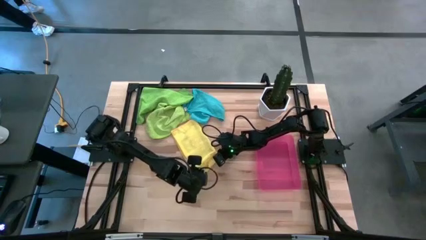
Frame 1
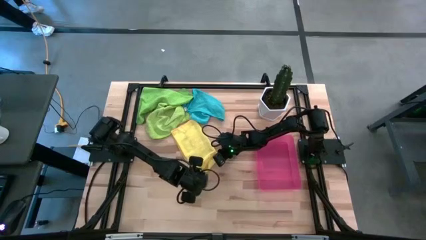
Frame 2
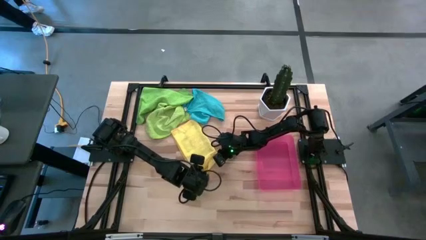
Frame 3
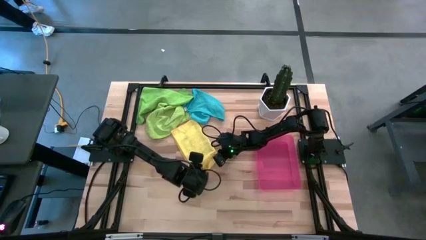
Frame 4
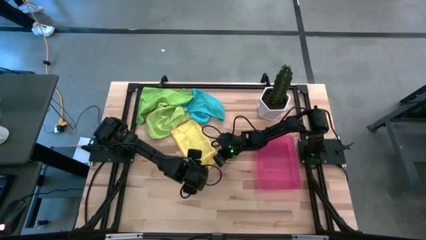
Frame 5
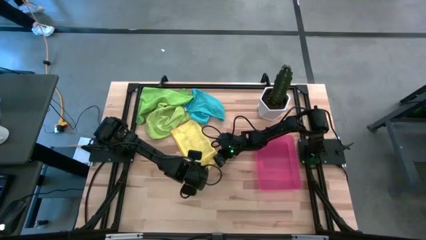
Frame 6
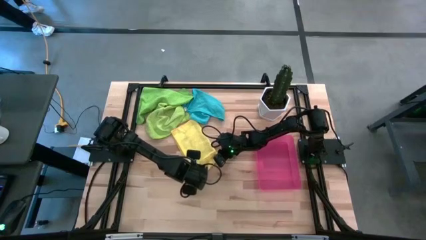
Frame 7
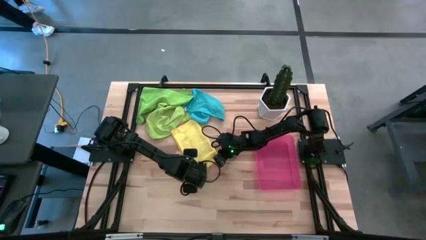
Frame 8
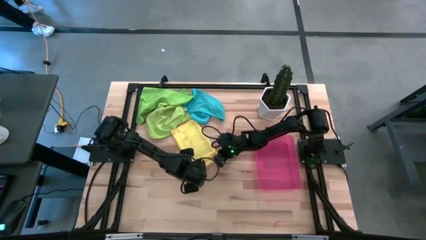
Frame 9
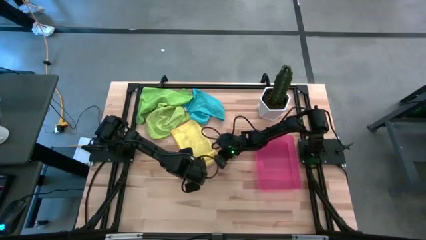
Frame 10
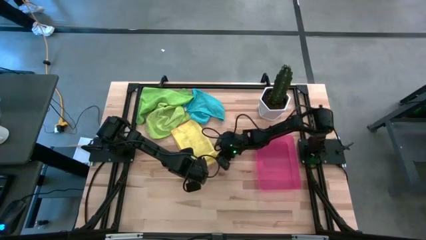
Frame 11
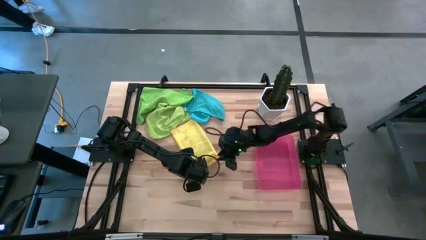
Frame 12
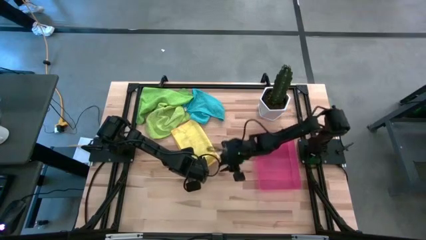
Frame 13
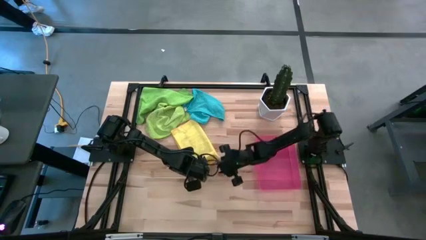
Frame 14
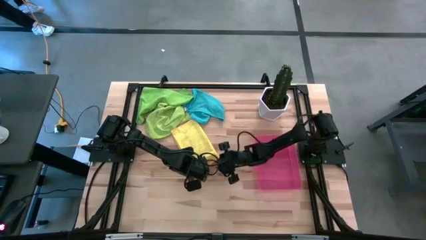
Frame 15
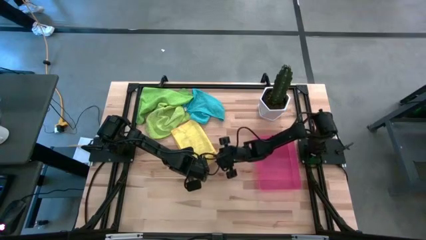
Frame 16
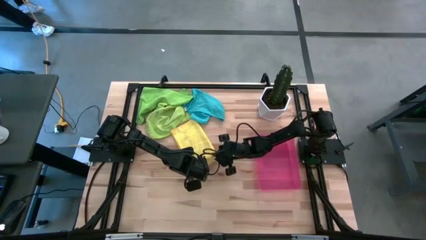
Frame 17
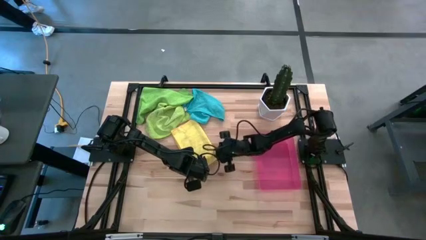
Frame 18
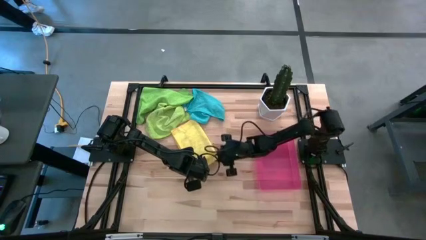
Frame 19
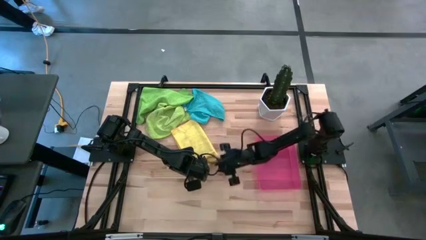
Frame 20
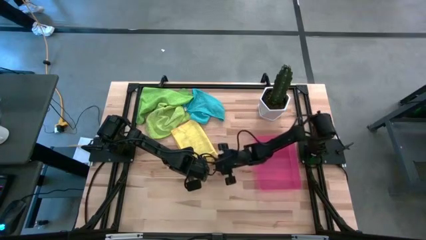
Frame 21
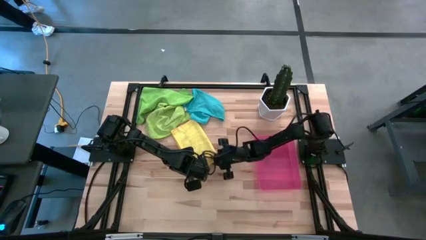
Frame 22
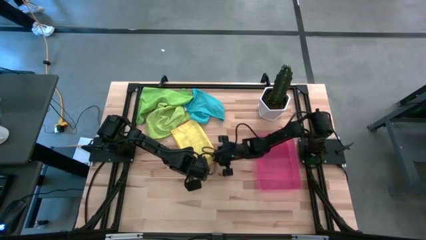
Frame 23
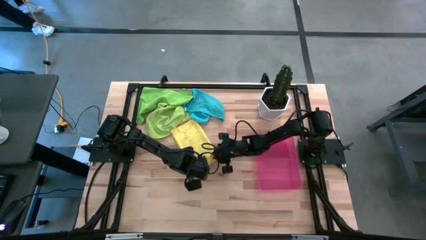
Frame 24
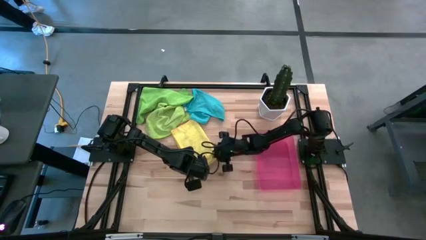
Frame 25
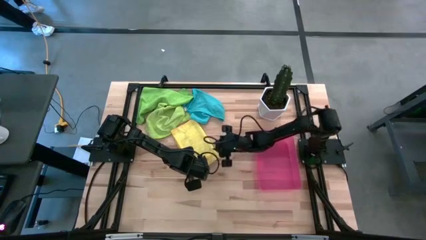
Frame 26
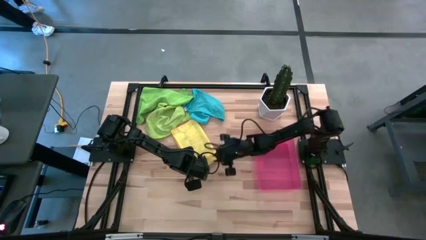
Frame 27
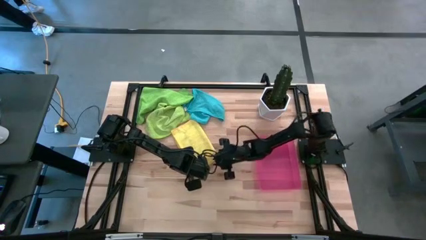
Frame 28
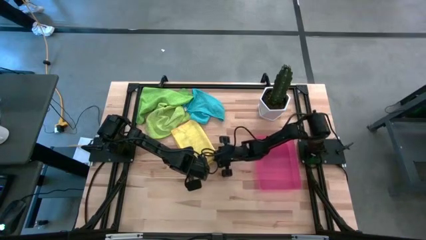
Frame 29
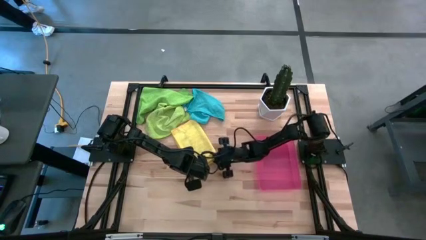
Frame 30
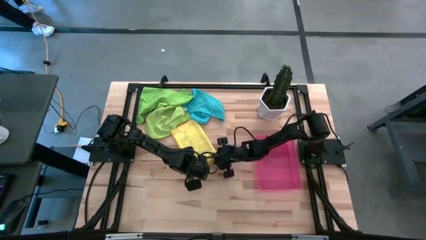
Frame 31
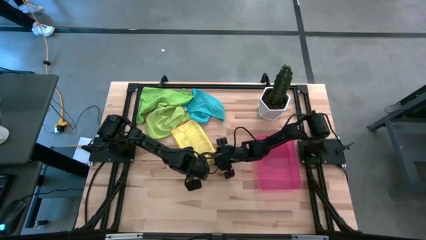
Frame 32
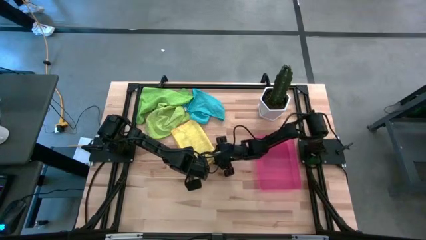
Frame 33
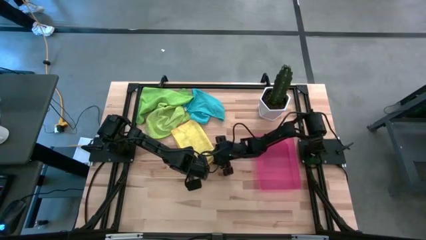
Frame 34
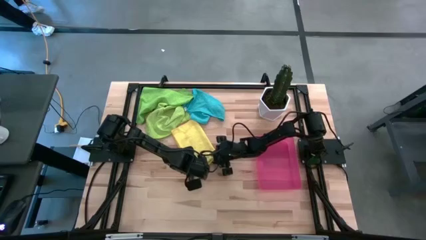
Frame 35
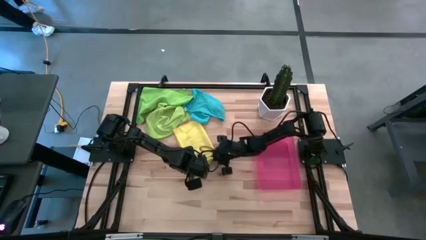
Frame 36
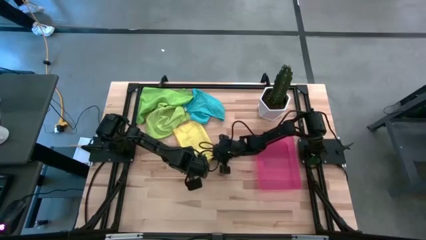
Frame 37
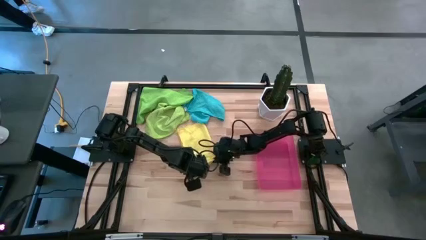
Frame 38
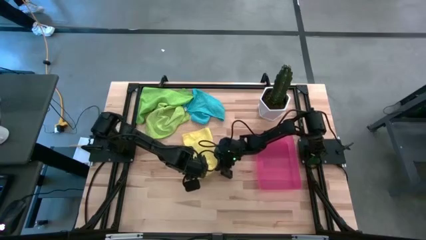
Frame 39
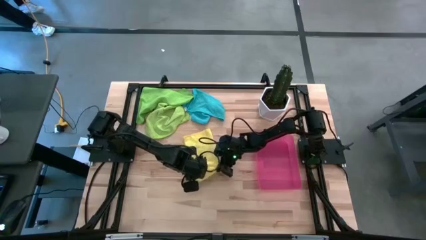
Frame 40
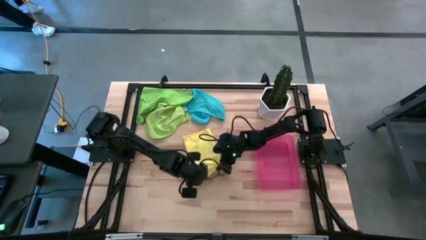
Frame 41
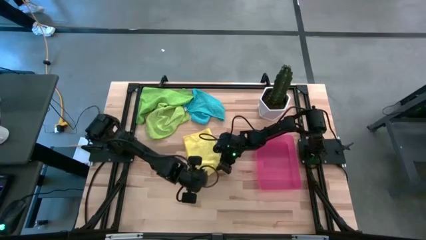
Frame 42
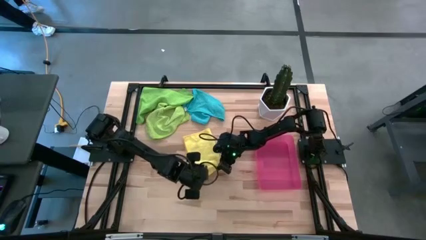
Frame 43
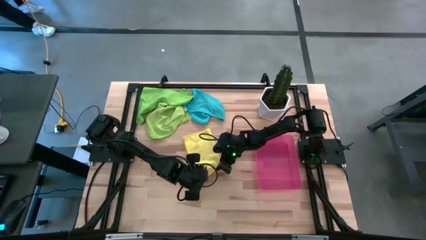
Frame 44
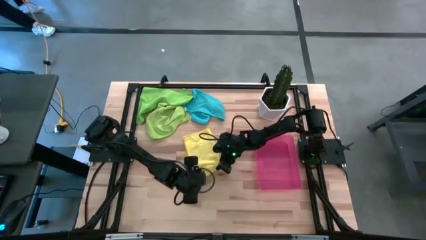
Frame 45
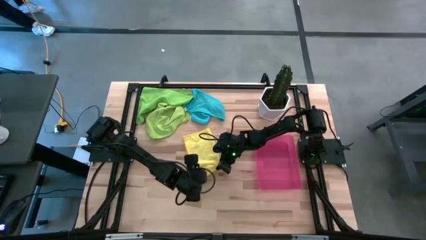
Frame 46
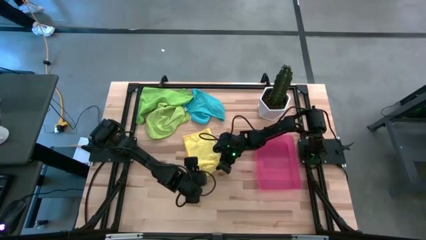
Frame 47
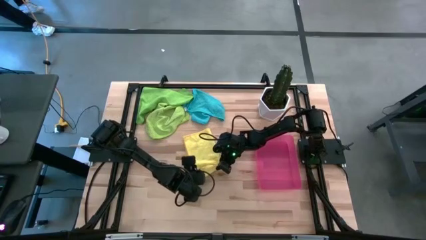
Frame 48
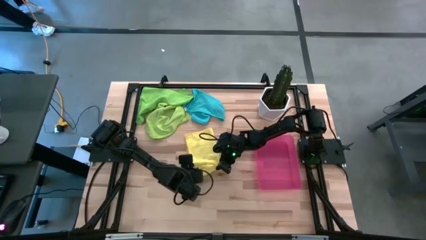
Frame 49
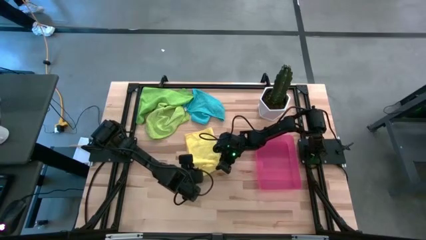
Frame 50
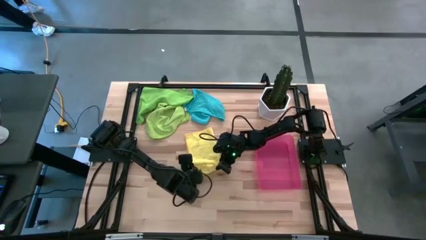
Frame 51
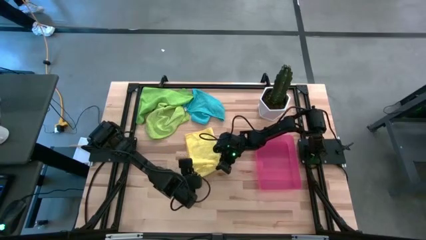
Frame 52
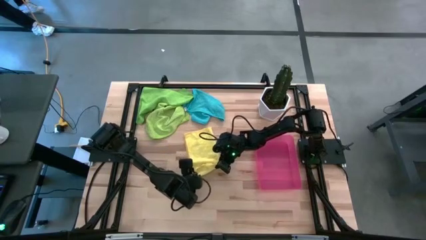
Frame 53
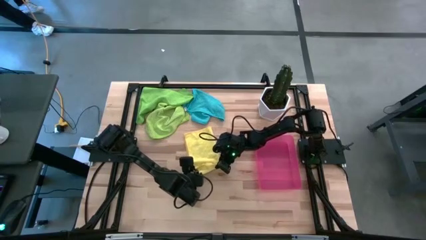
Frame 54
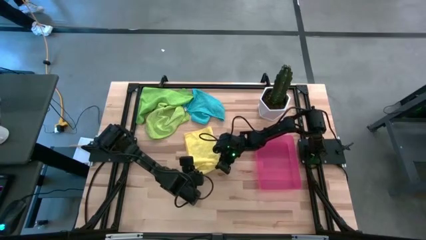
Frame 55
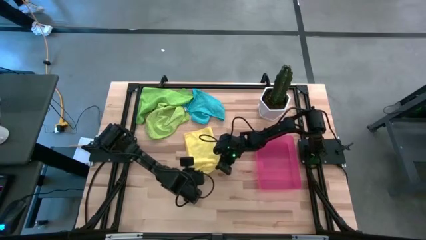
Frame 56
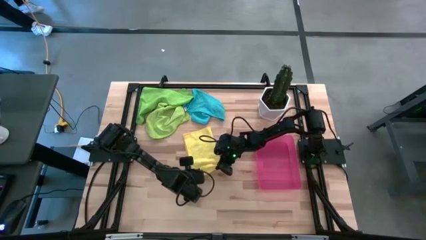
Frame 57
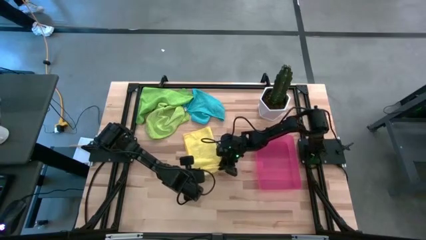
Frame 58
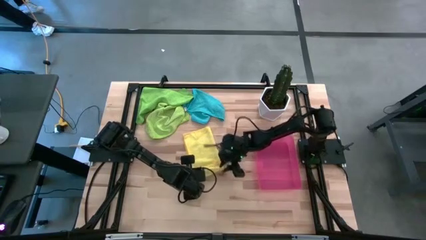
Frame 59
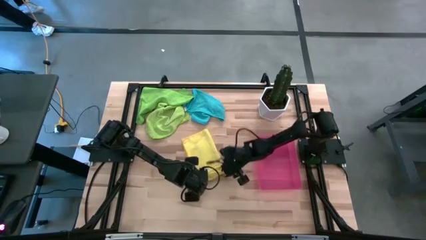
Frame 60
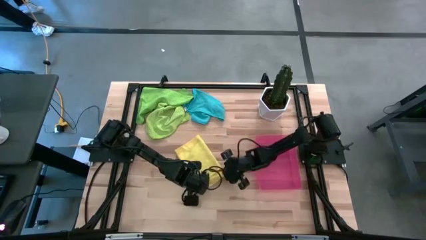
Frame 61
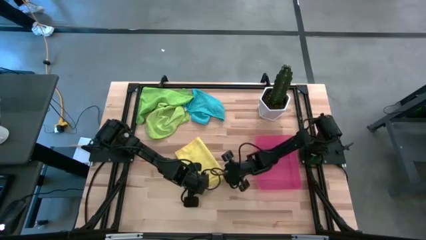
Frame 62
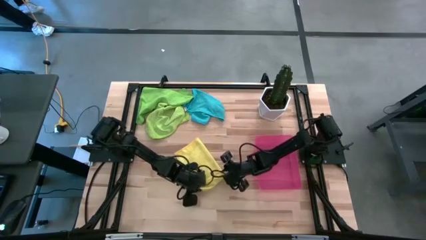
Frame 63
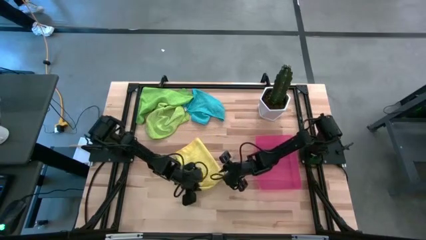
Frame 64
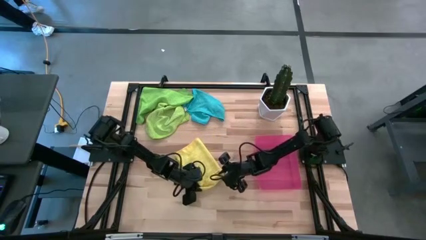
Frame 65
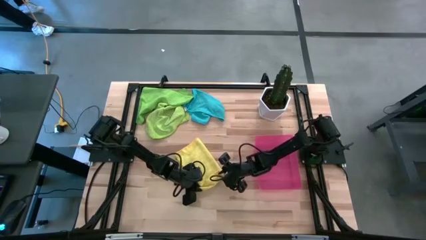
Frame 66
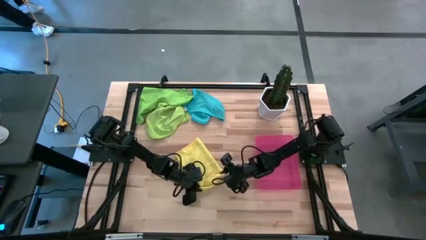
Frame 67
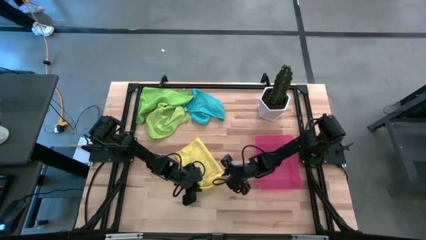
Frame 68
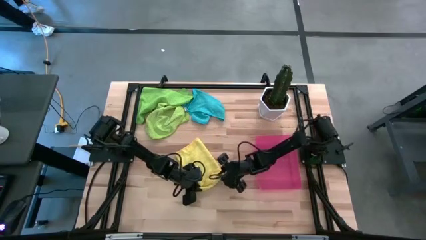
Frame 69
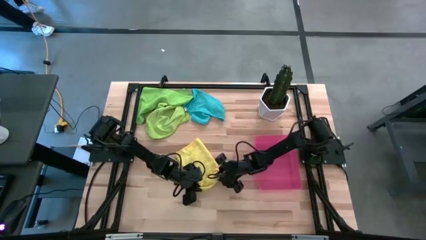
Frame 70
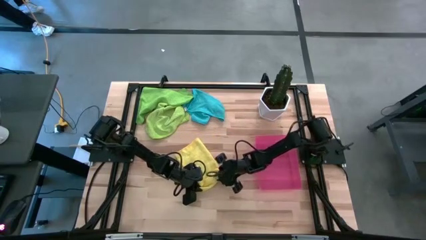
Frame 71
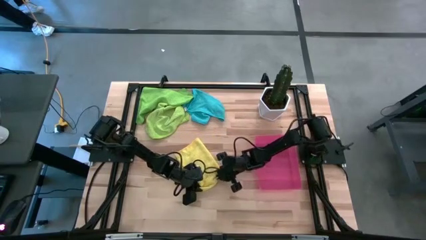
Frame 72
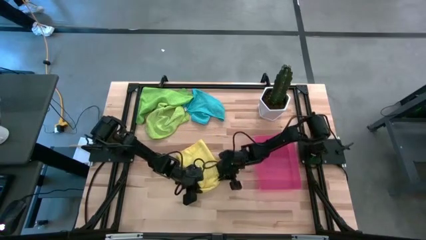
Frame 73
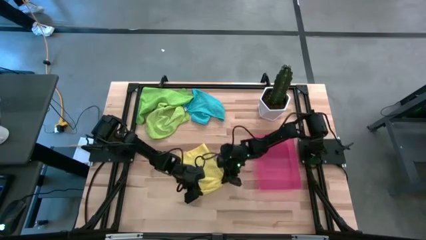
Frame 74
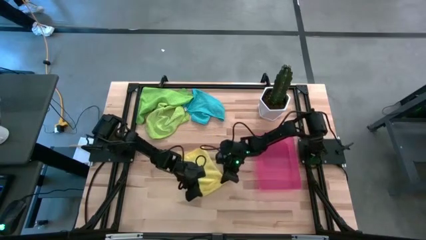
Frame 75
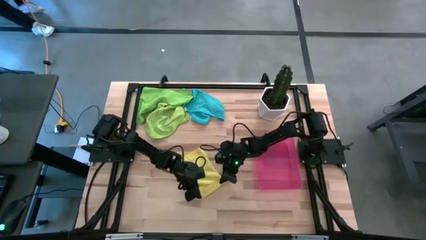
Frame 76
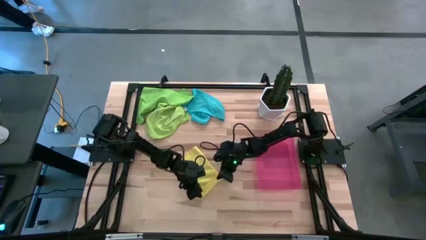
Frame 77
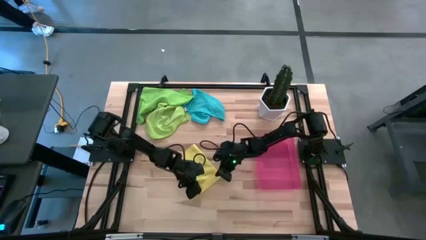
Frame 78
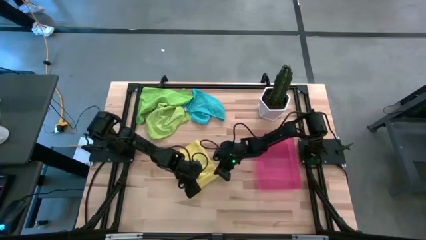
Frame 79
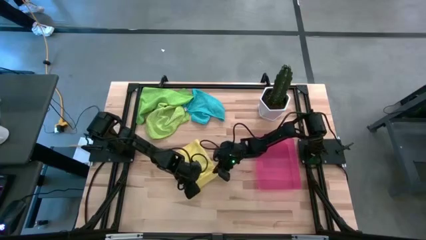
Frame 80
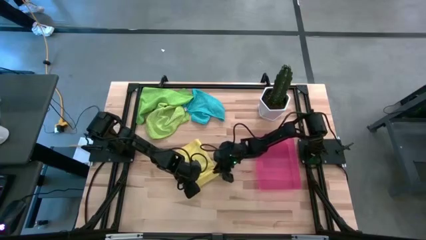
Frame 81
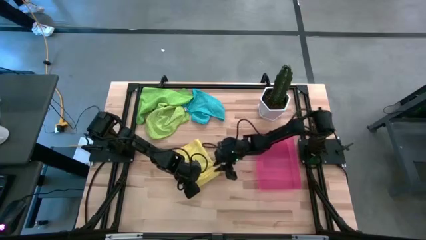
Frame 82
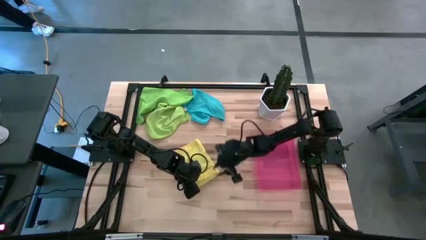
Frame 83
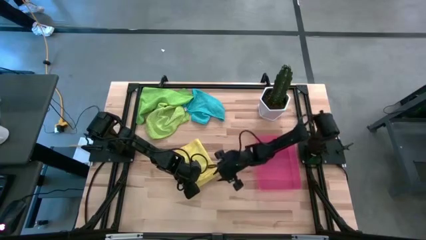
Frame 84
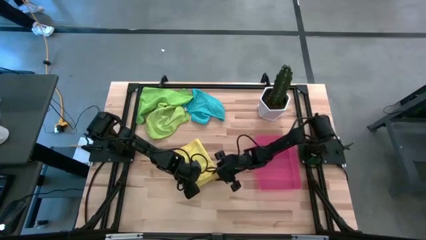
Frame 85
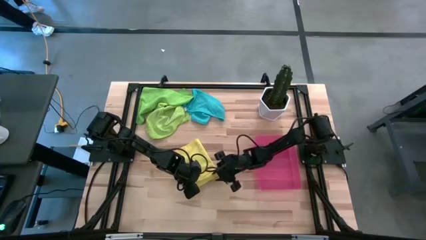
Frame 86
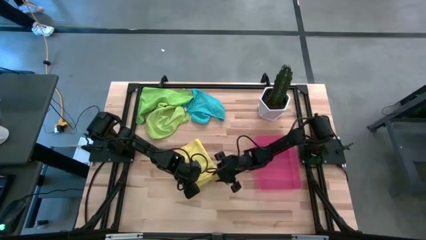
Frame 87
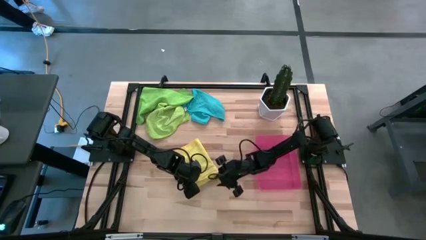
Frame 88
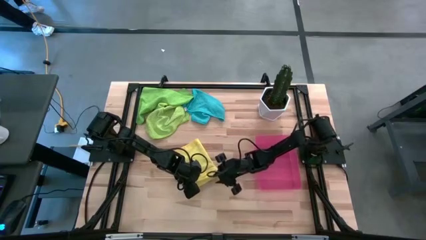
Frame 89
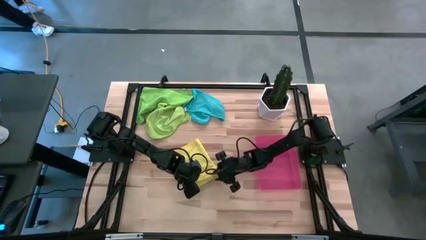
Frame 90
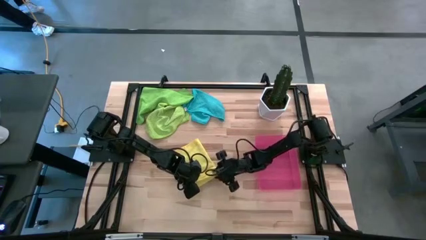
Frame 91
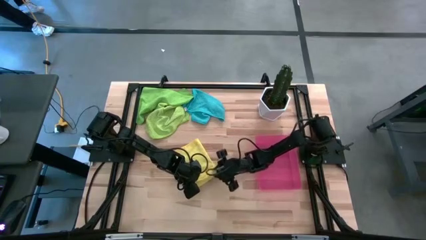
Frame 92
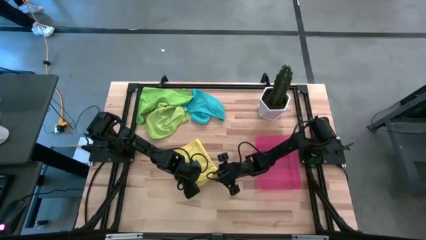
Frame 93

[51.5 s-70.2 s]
Task: Roll microfiber towels into tight, uniform cylinder then place into a basket
Roll the yellow microfiber towel
